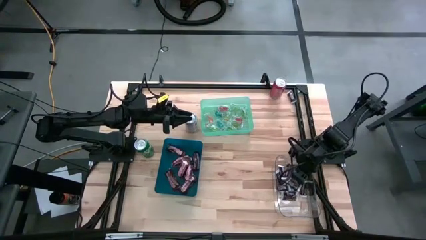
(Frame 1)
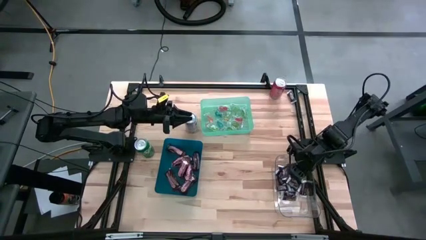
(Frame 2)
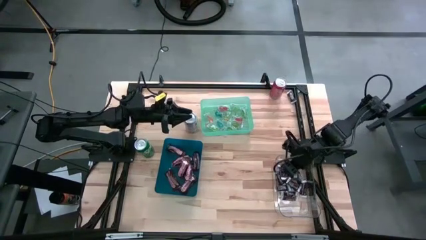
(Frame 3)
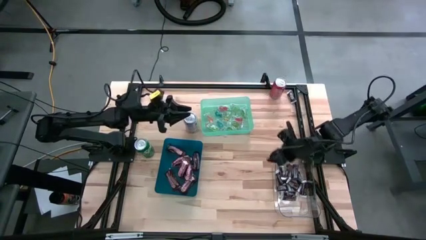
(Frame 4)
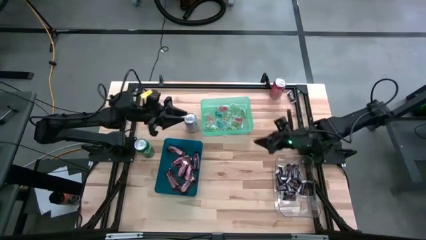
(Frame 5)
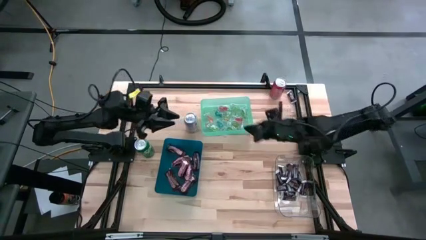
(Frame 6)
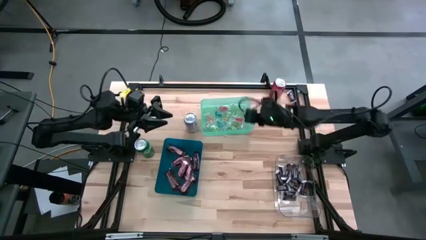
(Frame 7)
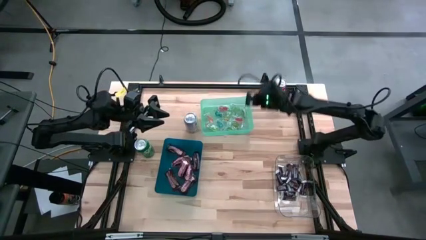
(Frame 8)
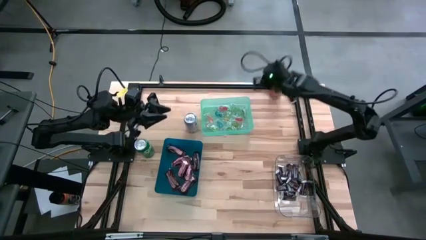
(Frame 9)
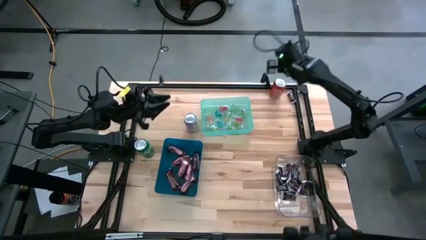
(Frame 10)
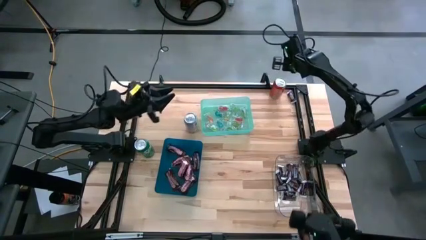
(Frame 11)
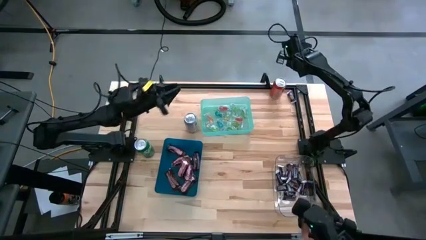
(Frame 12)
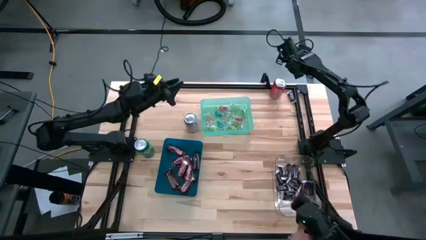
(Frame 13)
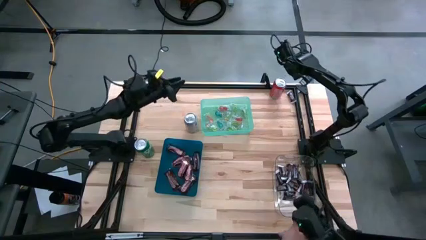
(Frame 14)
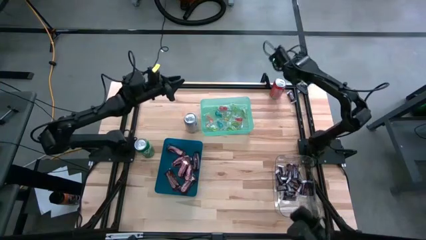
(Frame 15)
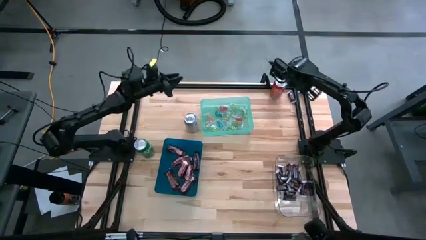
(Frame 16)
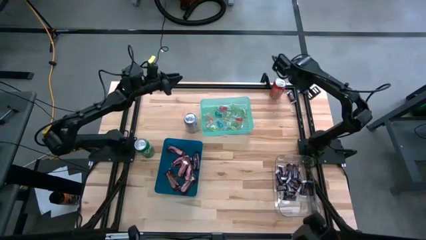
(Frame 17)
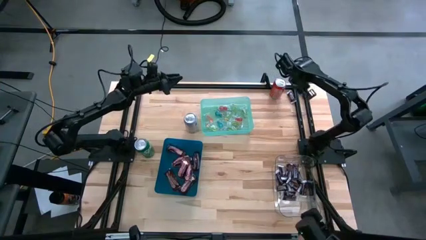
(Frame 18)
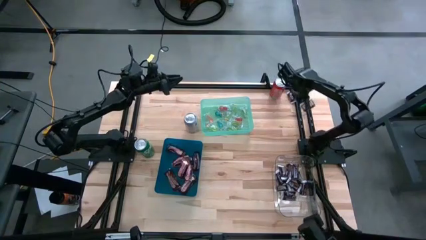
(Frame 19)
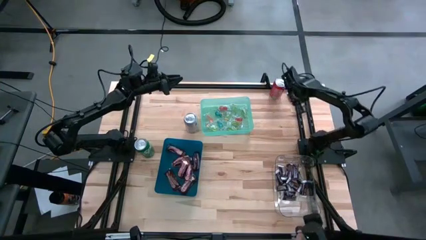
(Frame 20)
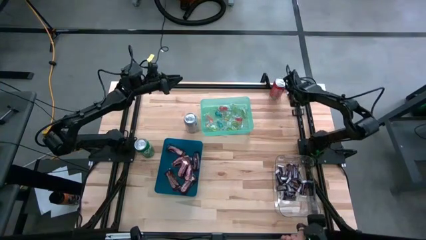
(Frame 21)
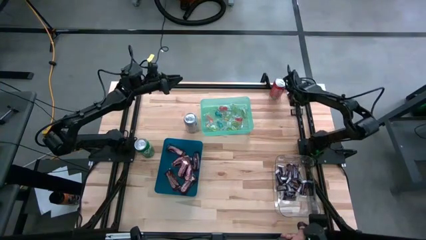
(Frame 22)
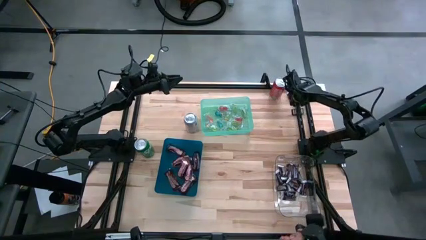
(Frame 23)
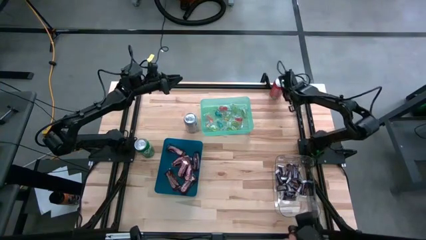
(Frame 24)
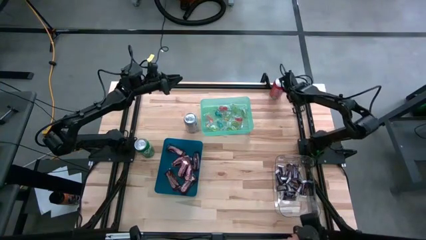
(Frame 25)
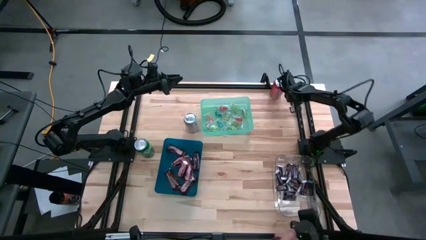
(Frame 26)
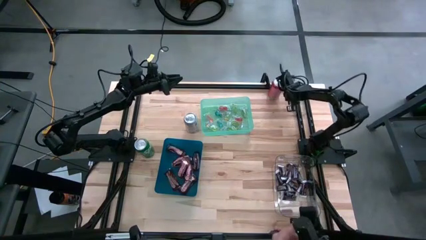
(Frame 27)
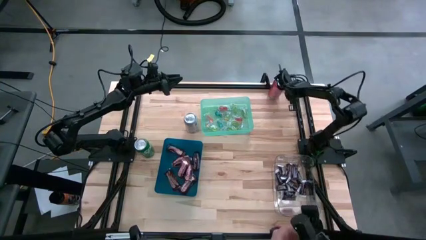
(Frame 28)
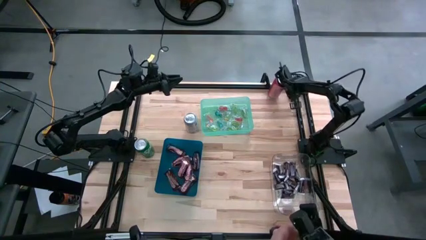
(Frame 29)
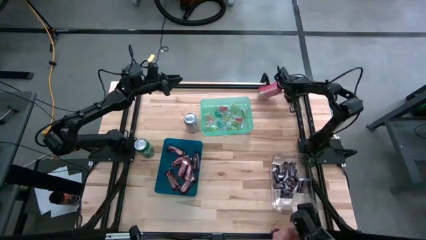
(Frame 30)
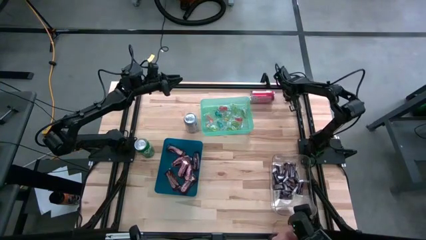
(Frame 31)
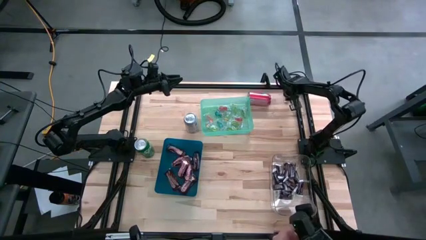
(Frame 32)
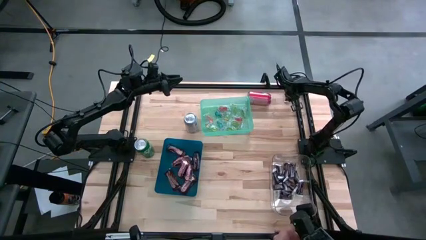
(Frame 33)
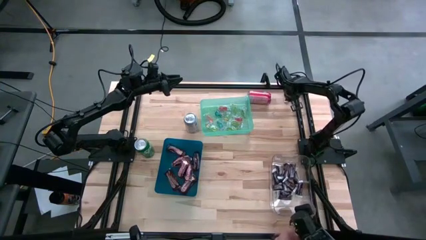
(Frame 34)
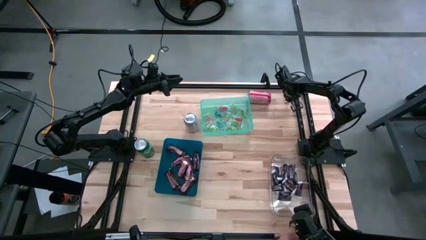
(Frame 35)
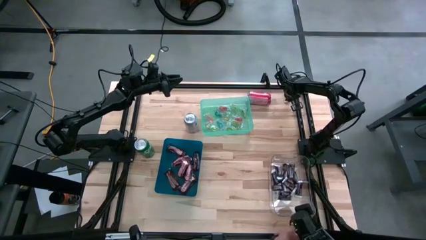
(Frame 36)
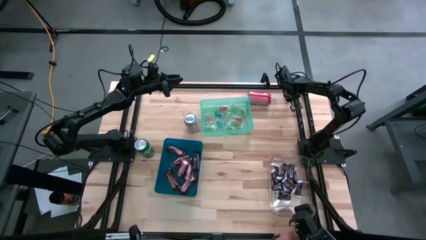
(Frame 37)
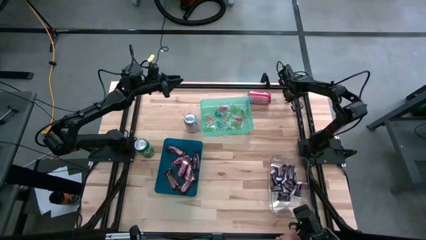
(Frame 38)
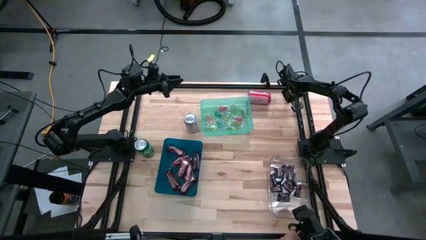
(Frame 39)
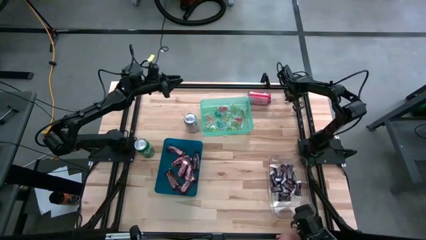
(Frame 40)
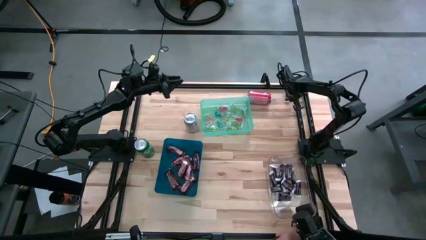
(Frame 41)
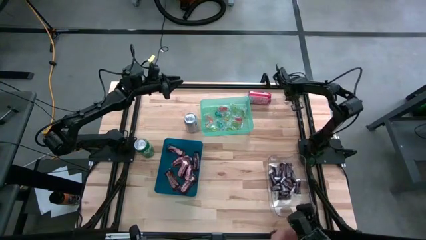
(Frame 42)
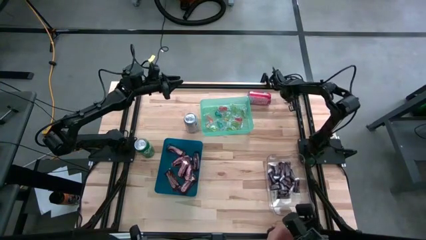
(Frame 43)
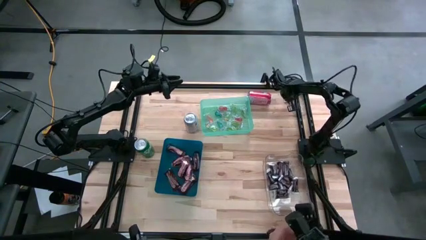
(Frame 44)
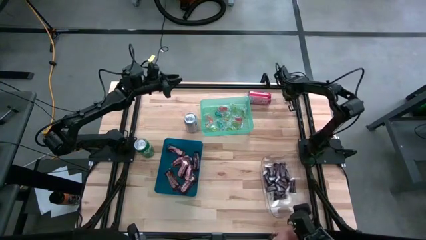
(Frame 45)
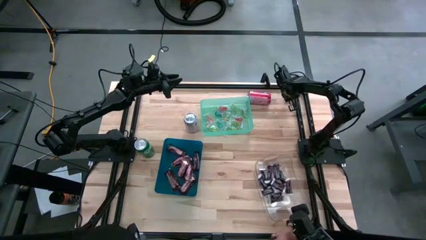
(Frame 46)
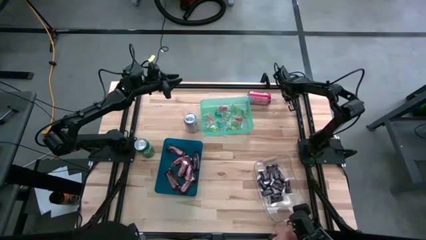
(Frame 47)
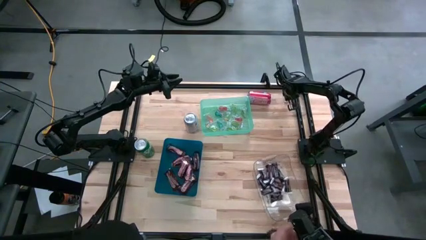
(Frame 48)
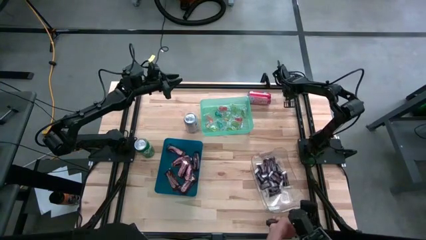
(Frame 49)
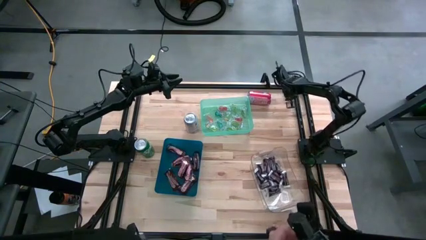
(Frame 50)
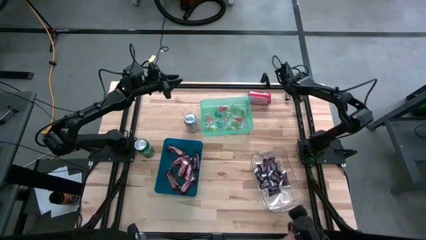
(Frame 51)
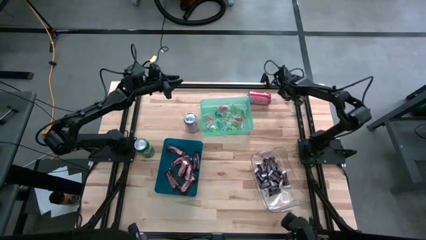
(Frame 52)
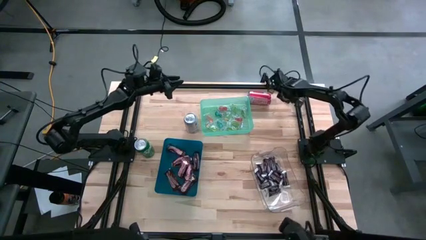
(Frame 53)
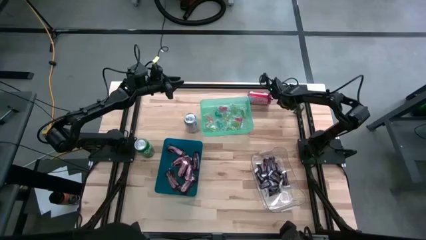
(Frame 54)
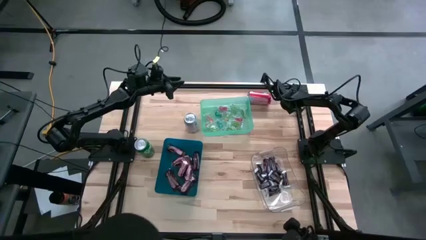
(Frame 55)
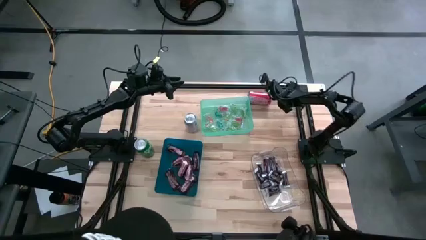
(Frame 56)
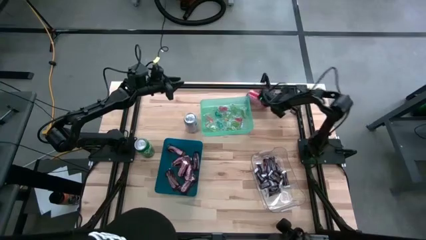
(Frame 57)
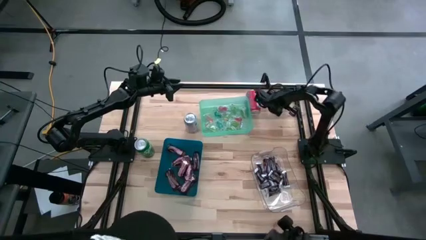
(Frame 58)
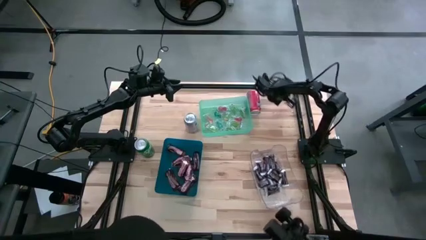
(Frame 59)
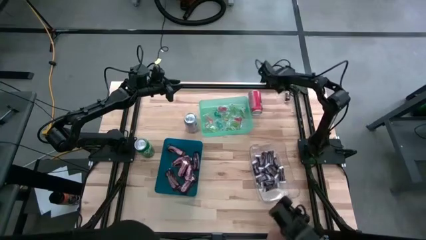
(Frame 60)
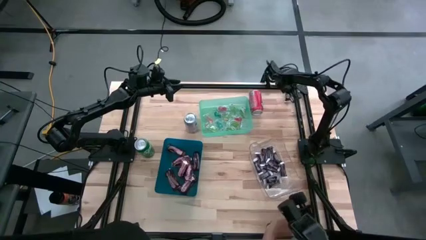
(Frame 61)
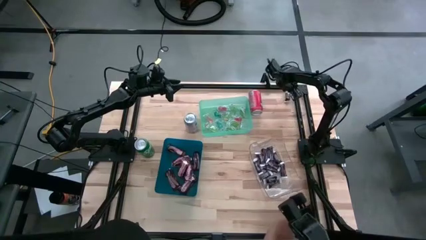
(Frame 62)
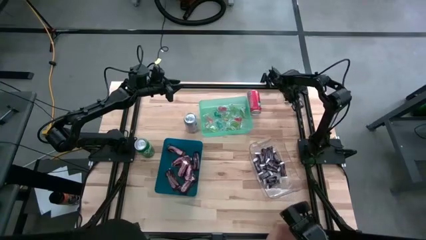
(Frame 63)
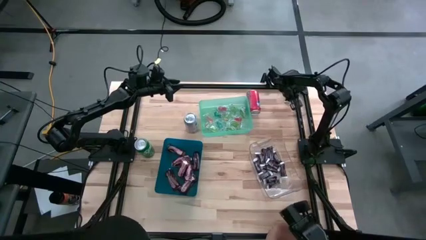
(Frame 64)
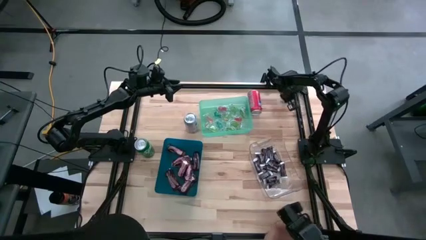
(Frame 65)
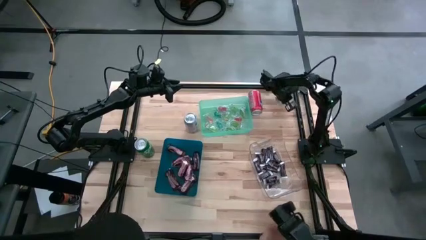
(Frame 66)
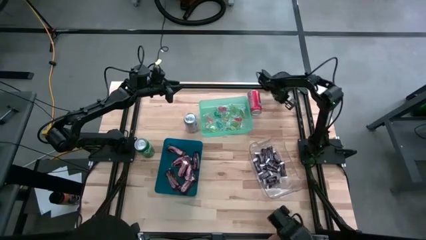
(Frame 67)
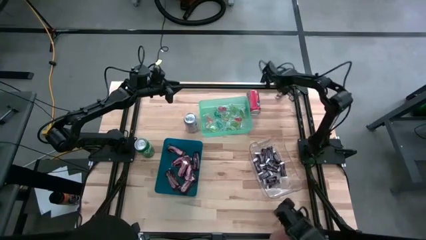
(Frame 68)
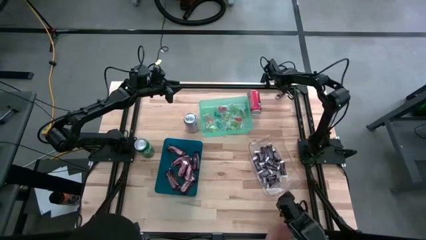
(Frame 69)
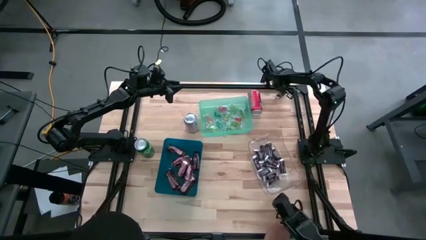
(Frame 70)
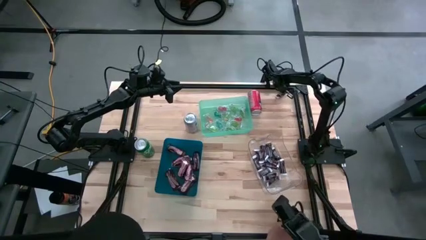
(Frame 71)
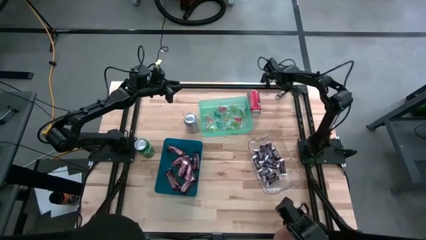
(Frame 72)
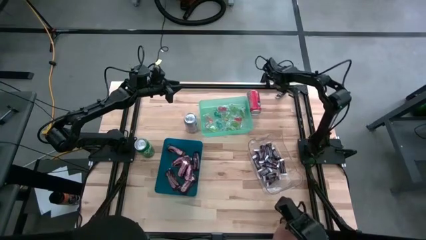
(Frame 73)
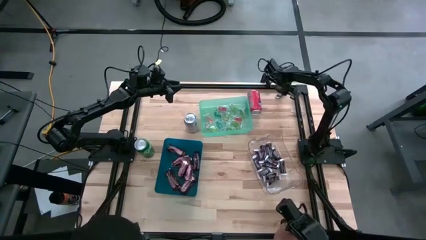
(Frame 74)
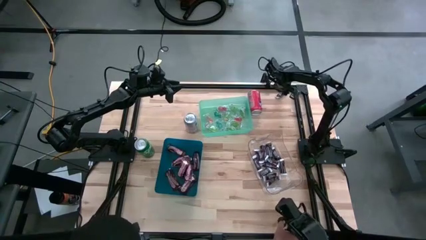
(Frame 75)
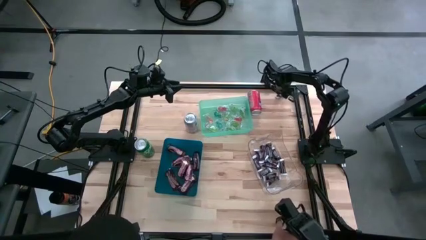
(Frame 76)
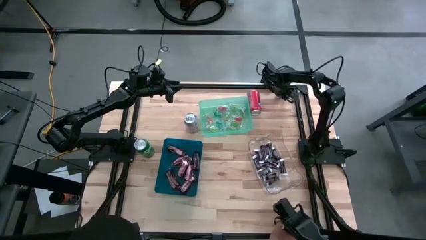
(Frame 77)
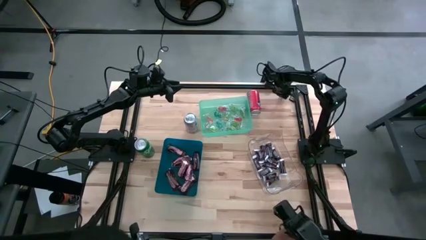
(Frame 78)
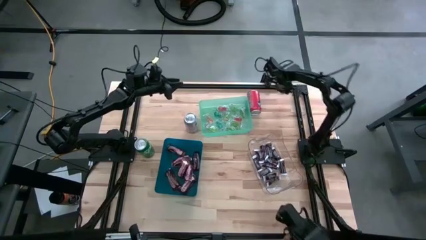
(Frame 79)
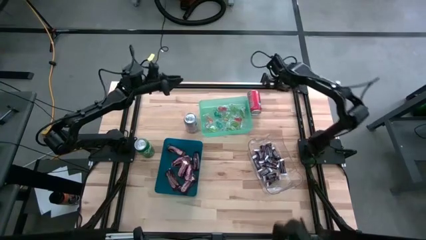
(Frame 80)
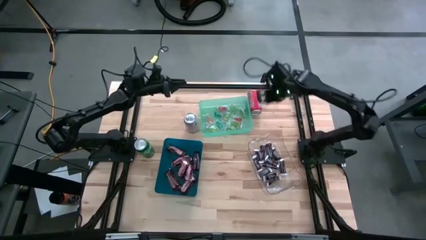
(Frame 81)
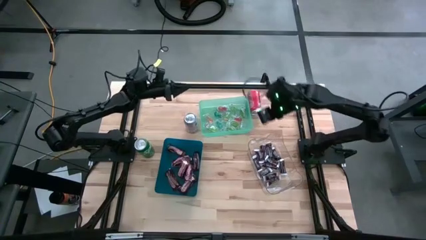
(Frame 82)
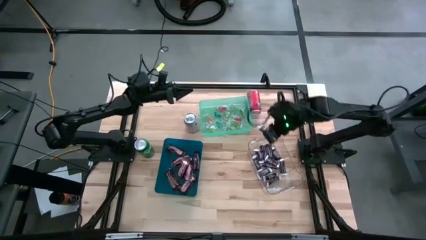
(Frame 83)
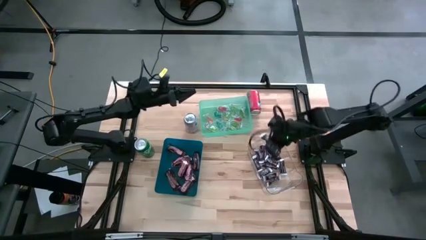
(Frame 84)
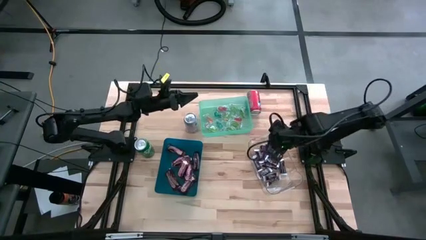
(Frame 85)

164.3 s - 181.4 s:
Task: Organize candy in baskets
Put the dark brown chocolate bar into the transparent bin
